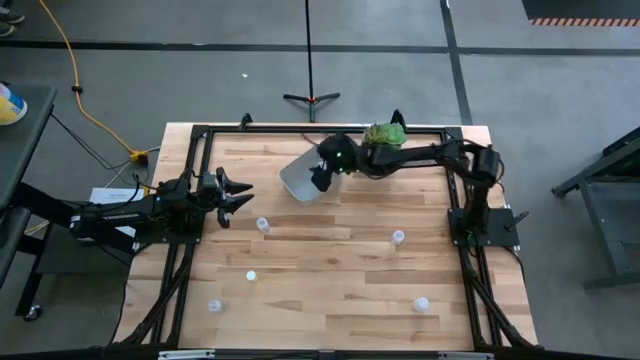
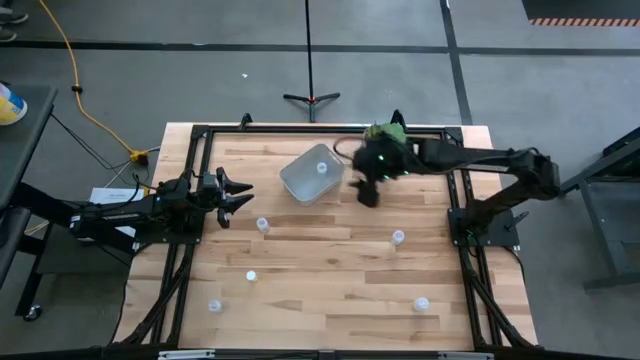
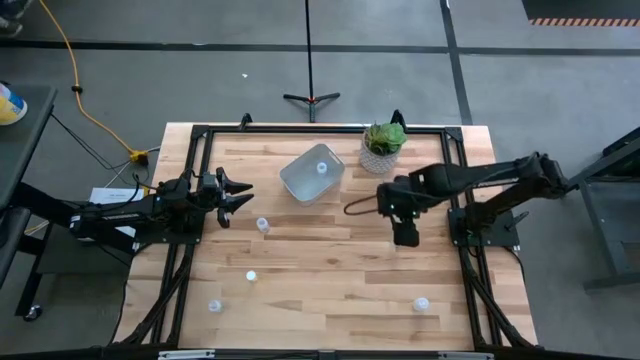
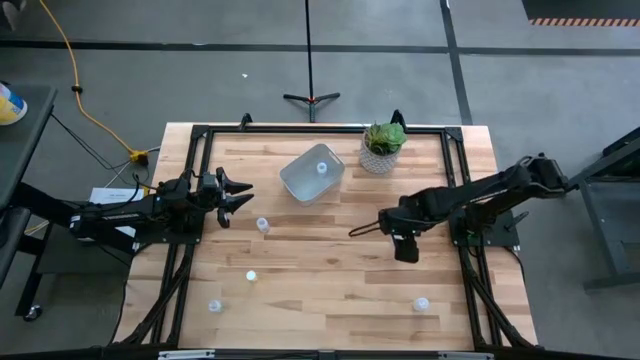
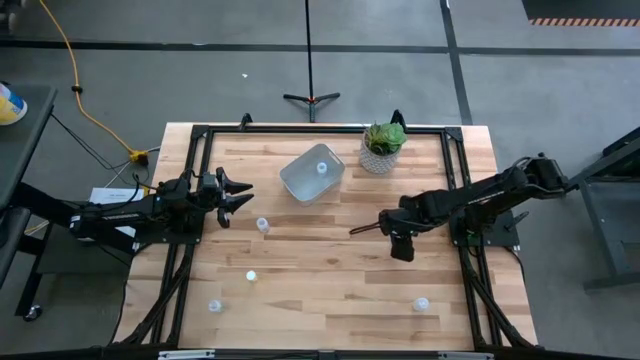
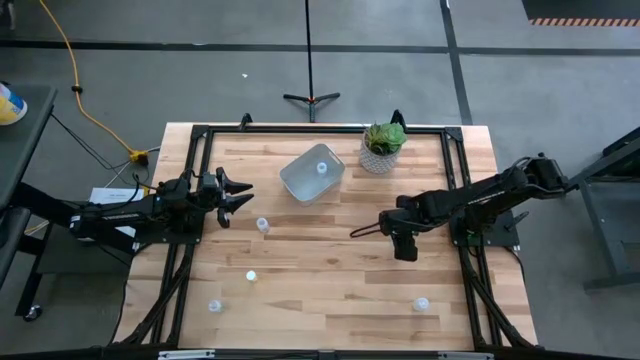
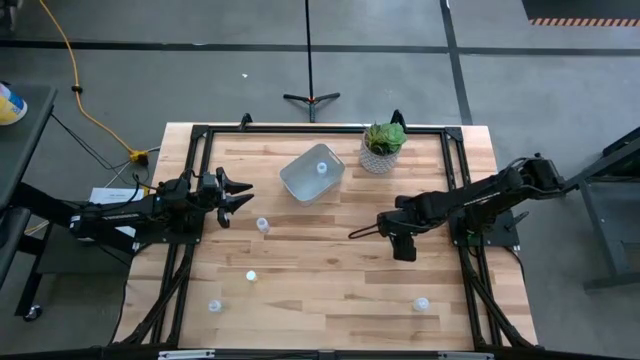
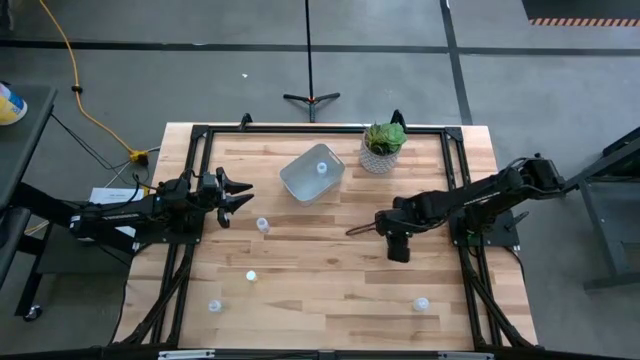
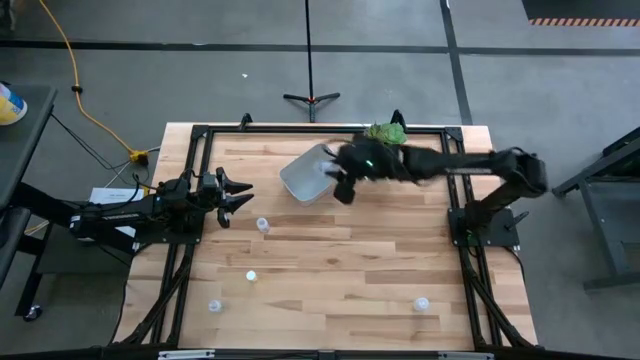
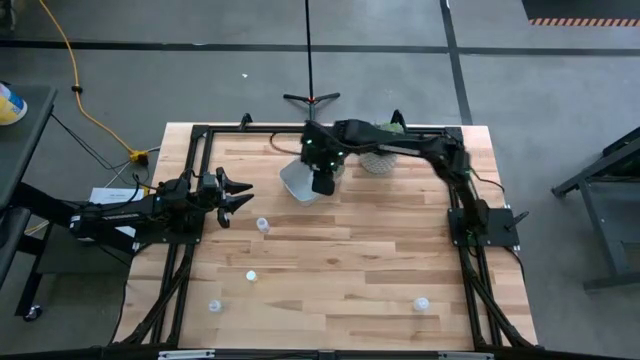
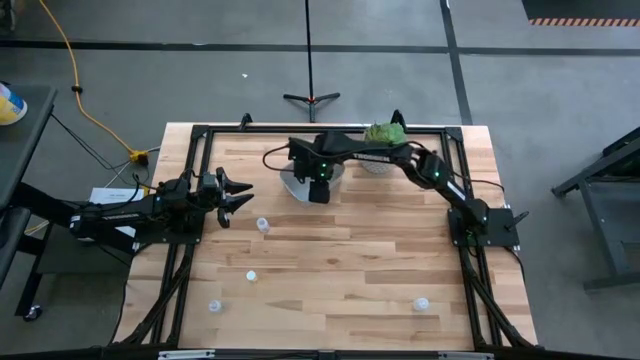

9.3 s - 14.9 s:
Task: Pick and place pill bottles into a basket
Put the transparent medicine bottle into the gray bin

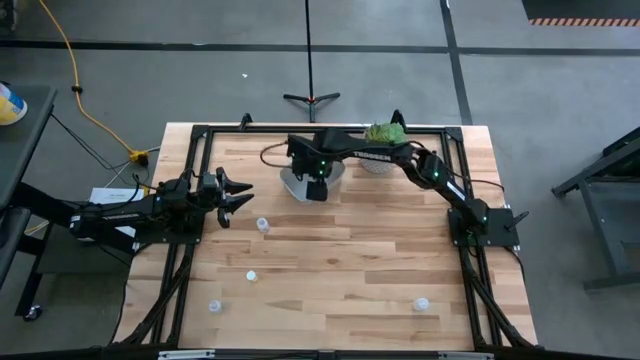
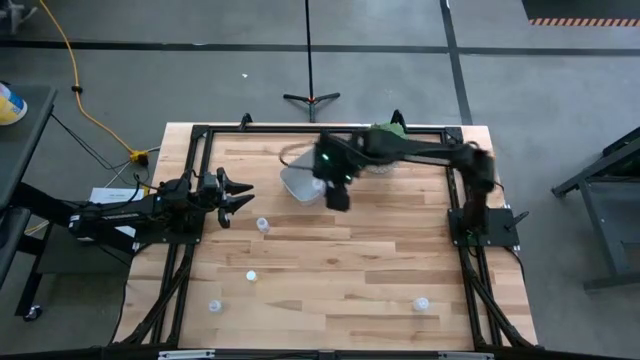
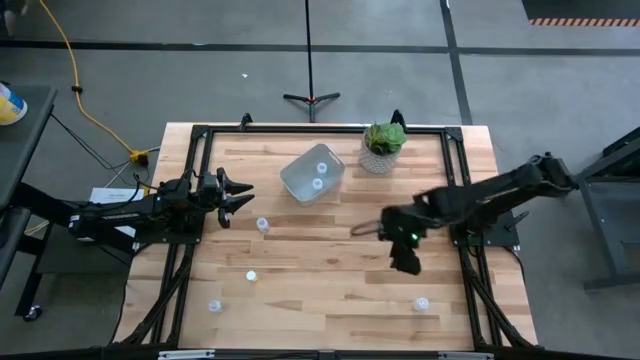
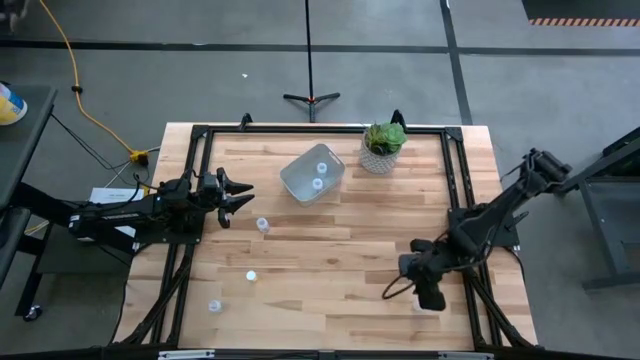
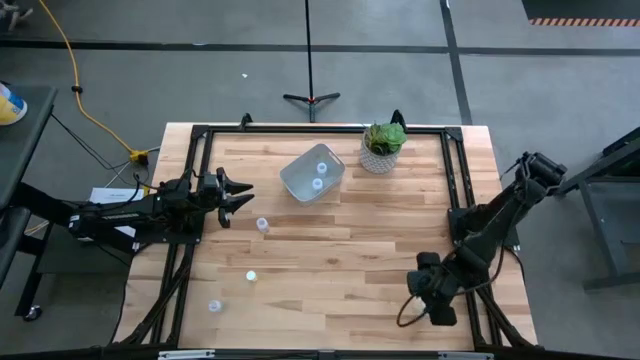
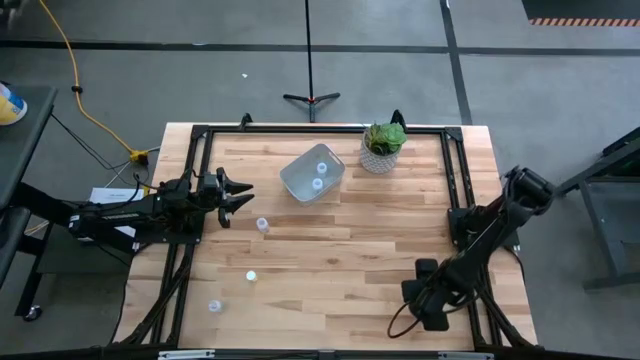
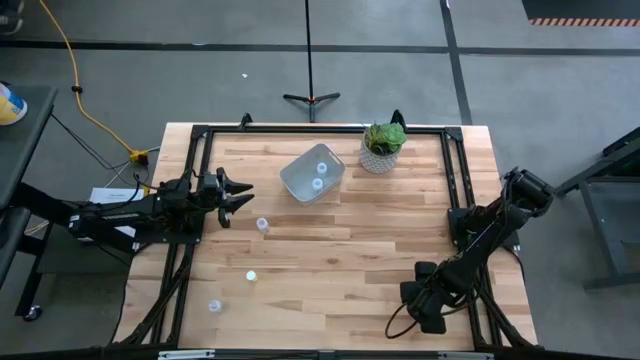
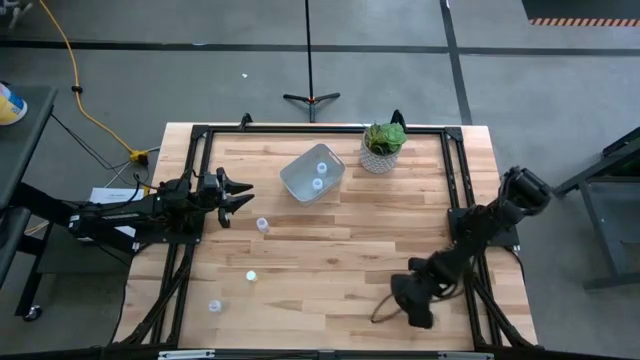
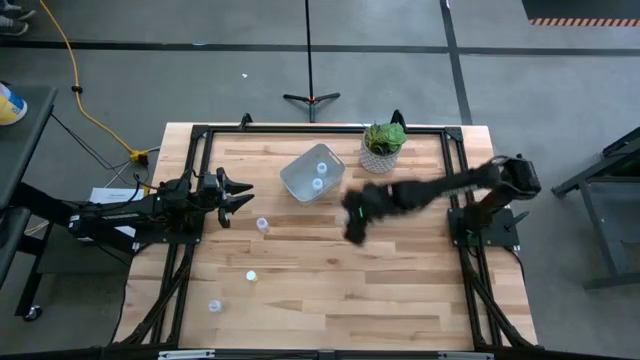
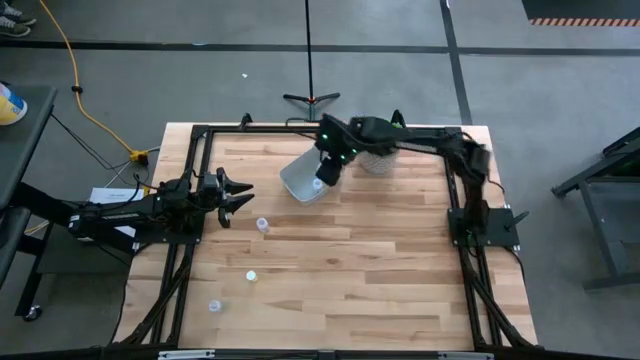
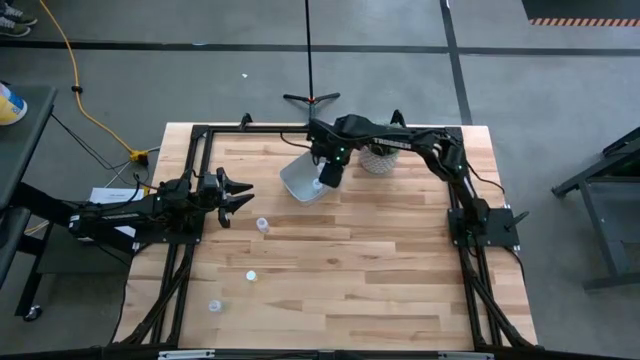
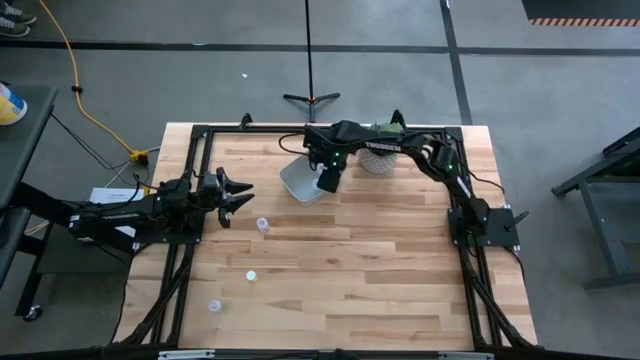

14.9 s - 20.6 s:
Put the white medicine bottle into the gray bin

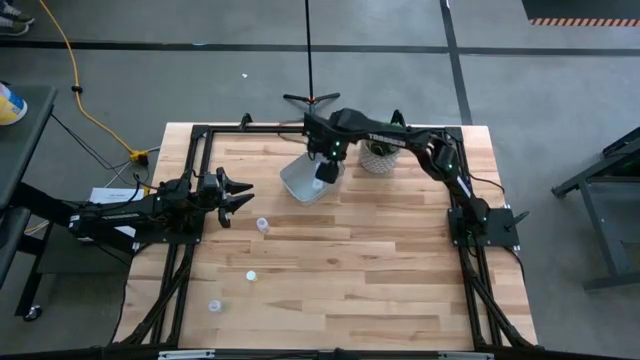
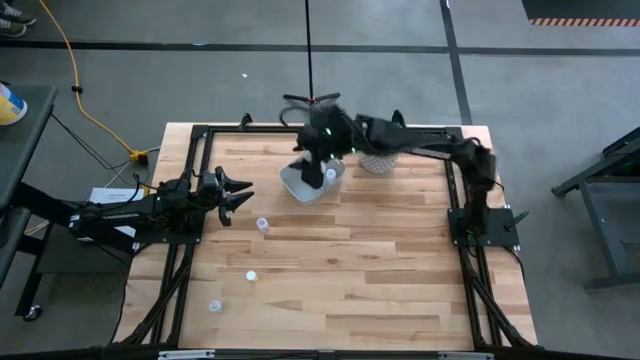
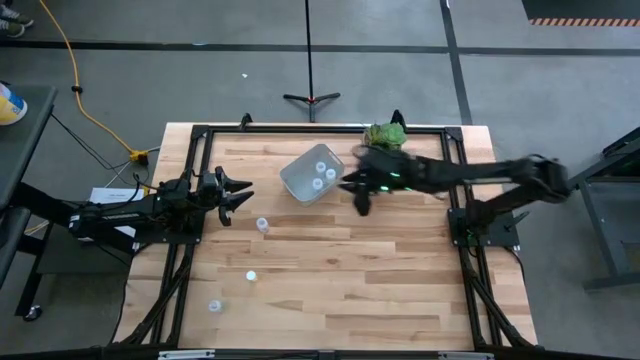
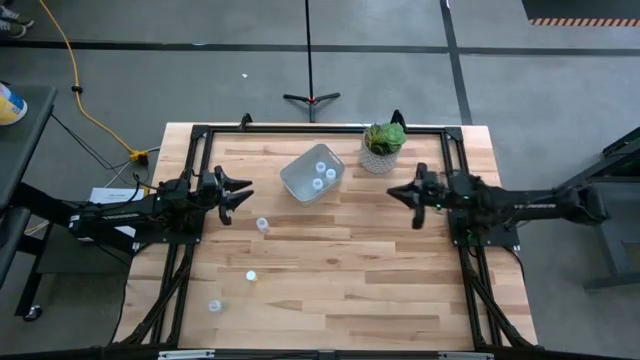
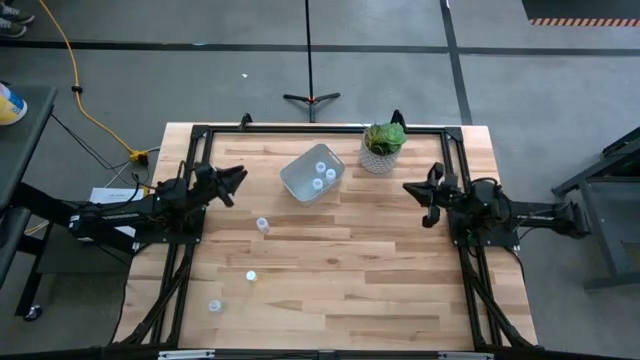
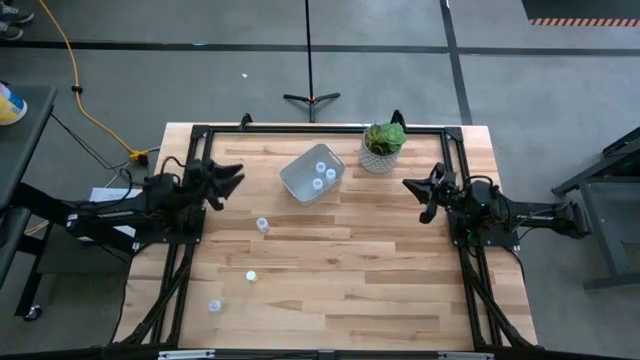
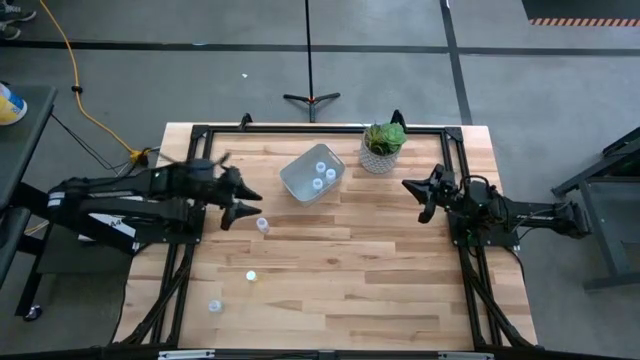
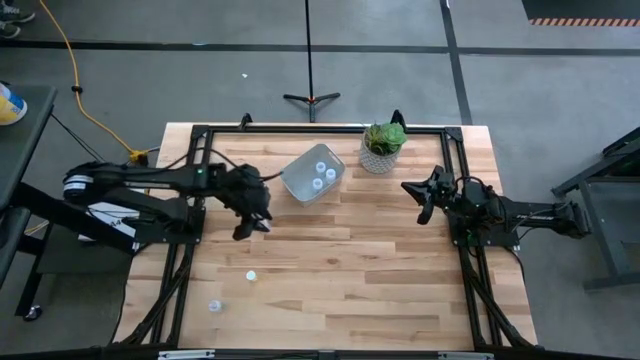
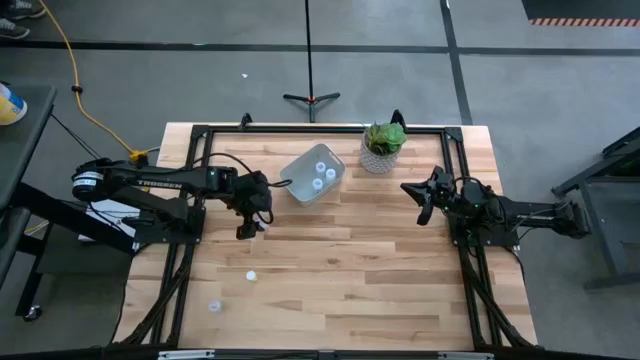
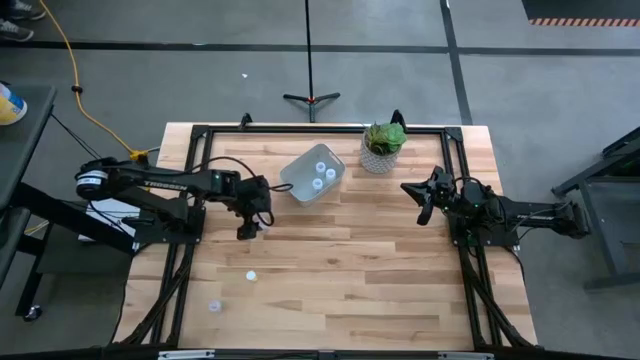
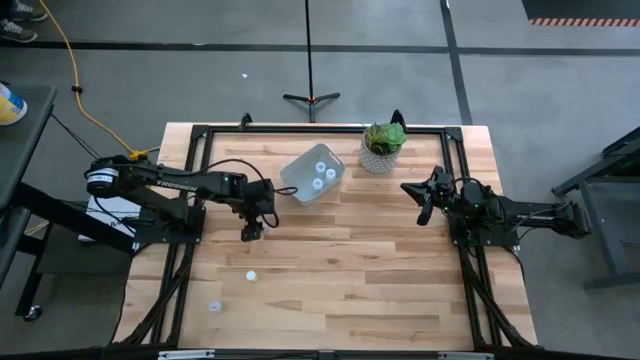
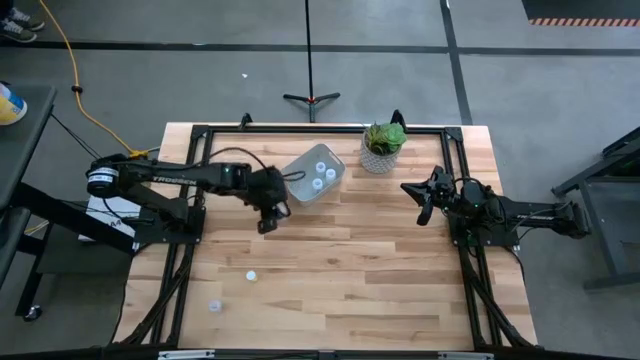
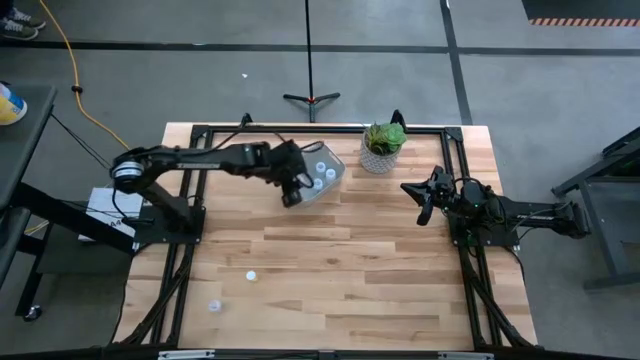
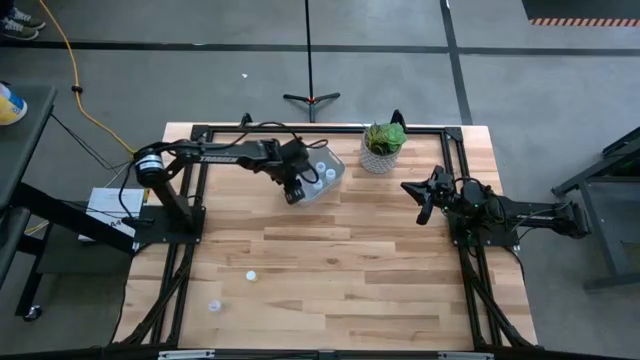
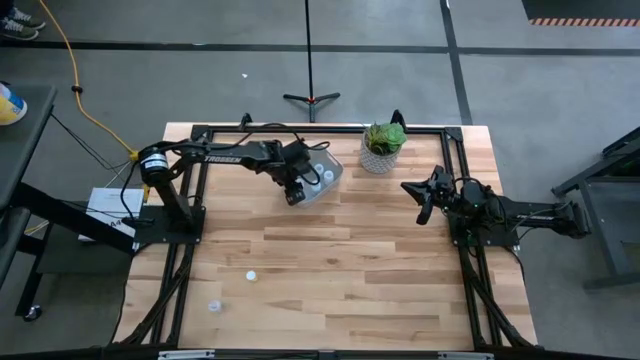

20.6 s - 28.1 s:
Put the transparent medicine bottle into the gray bin

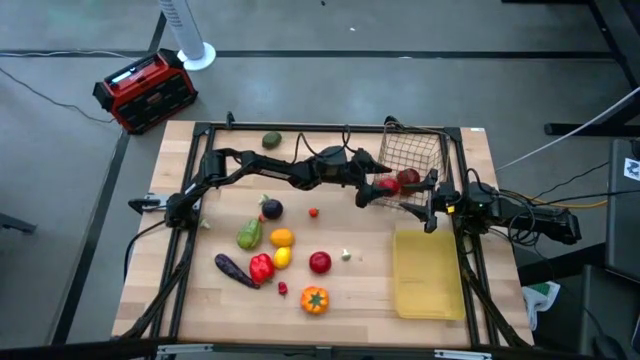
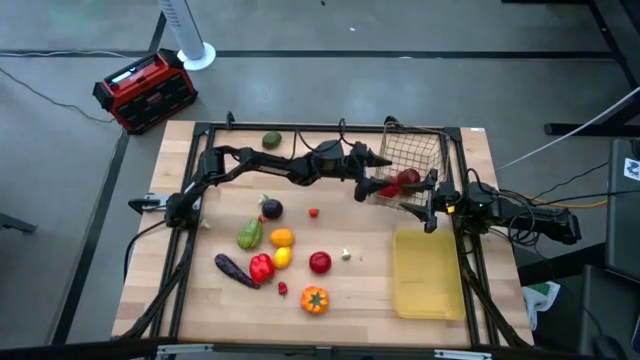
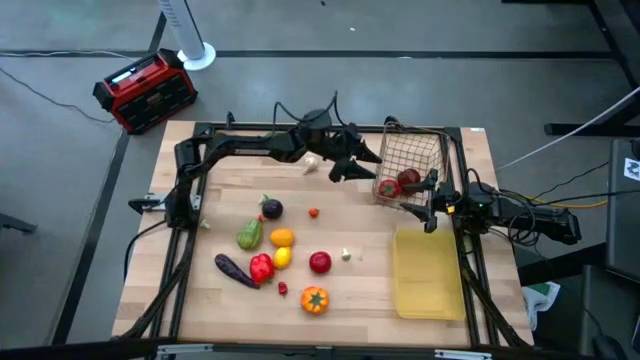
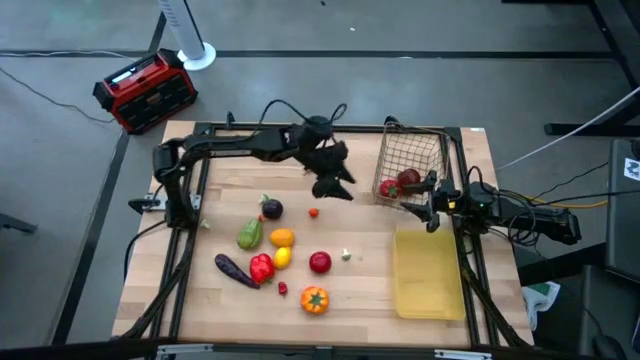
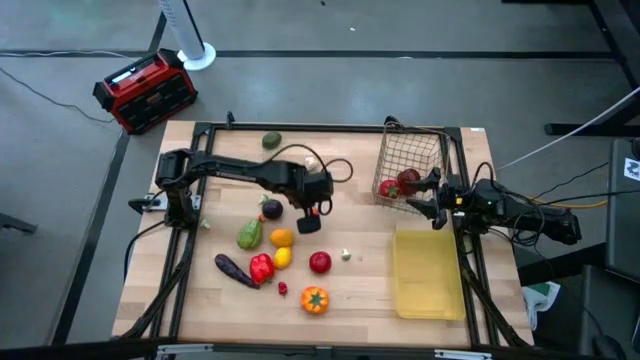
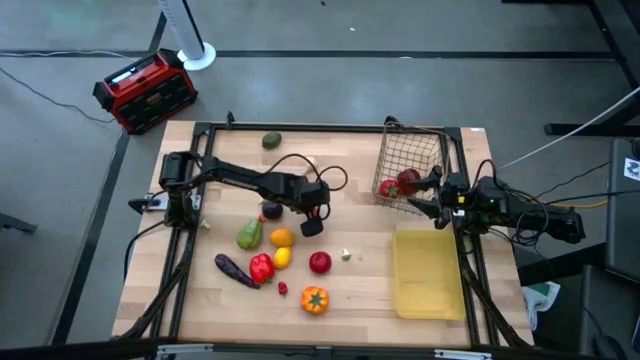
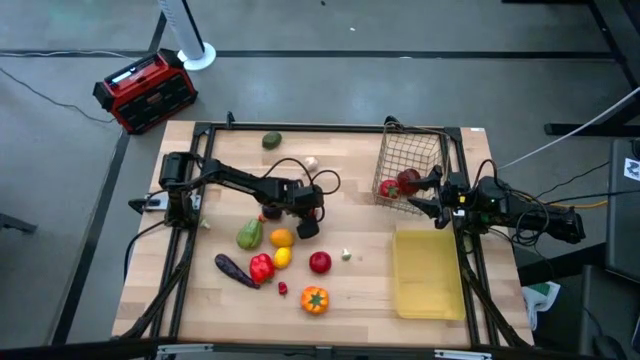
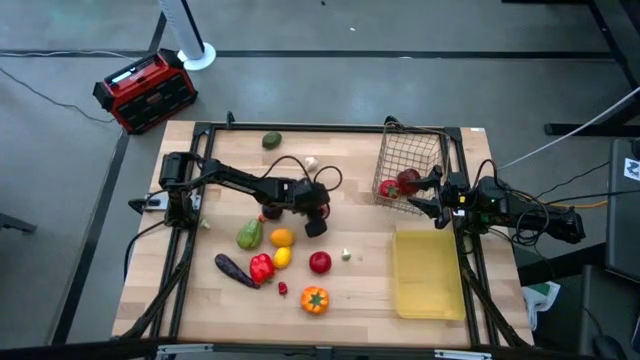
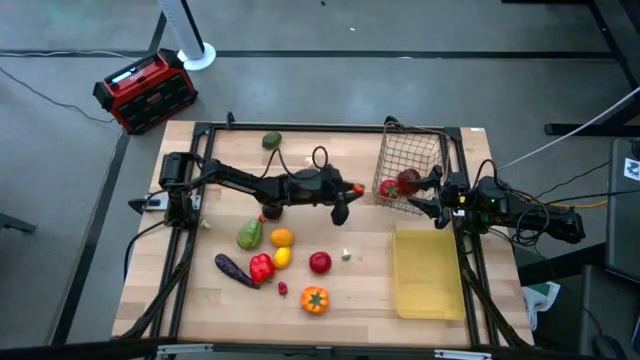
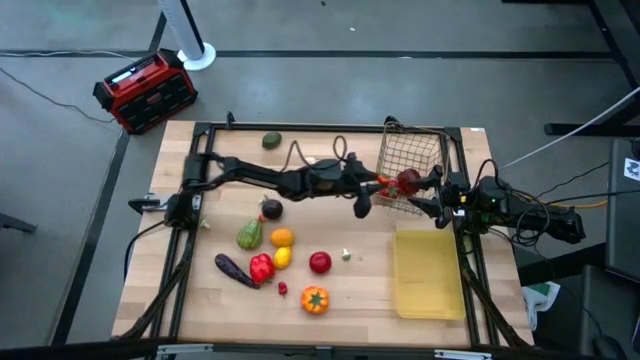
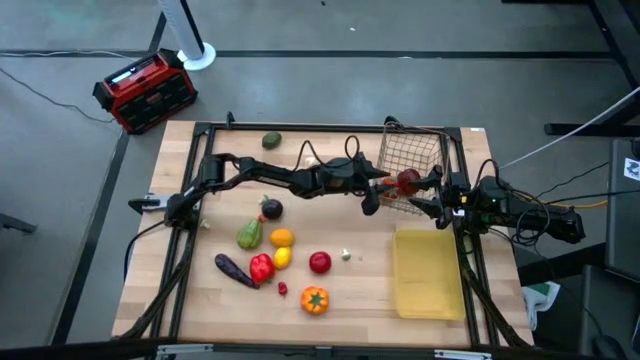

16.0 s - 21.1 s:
Task: Sort produce into baskets
Put the top orange tomato into the wired basket
